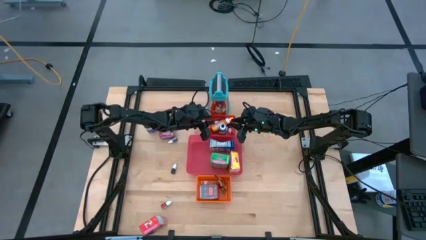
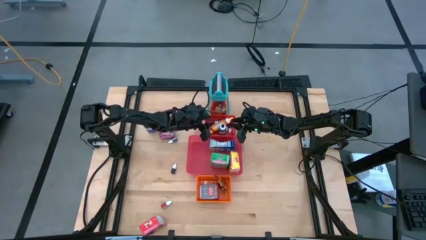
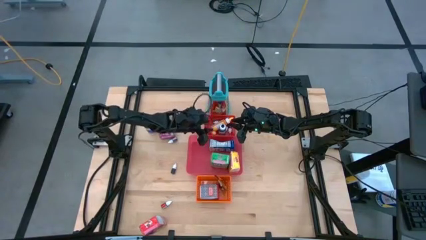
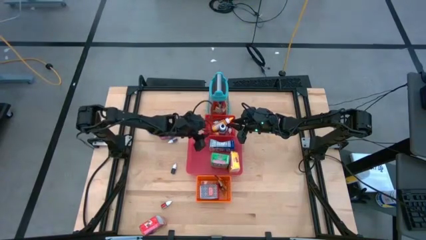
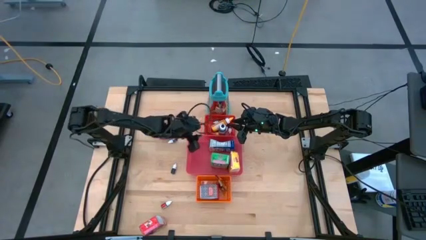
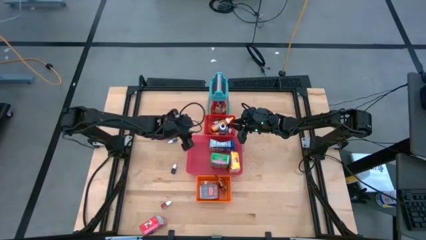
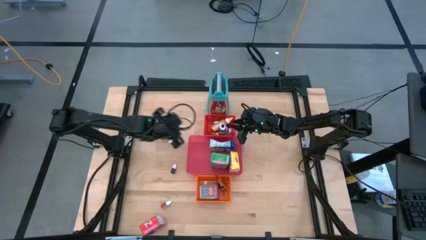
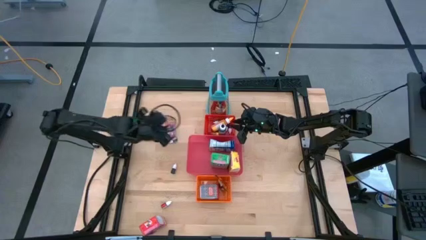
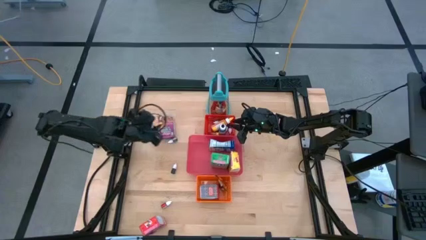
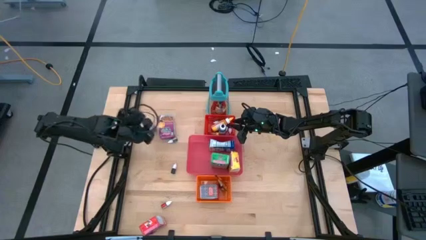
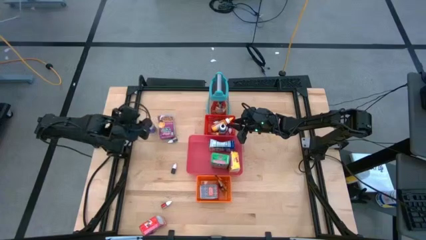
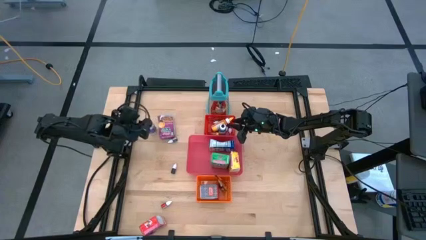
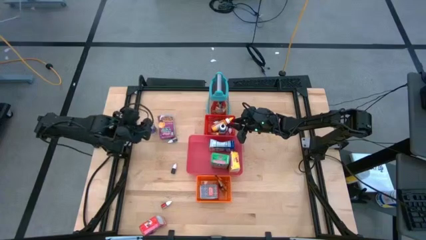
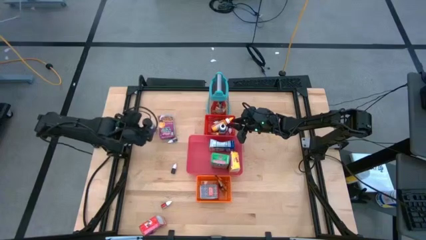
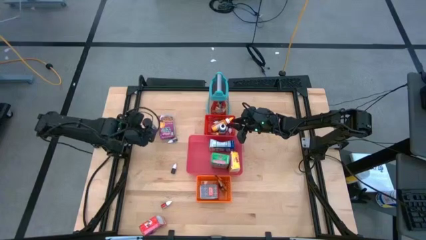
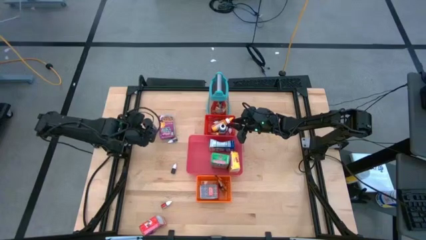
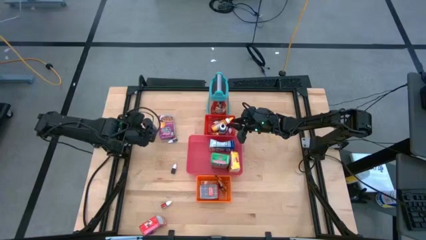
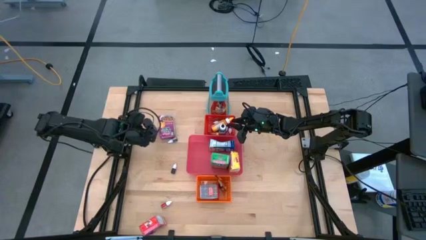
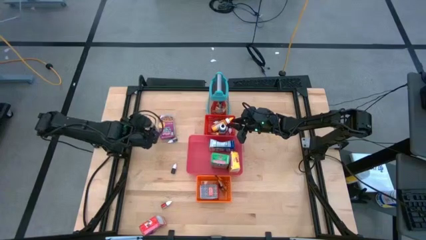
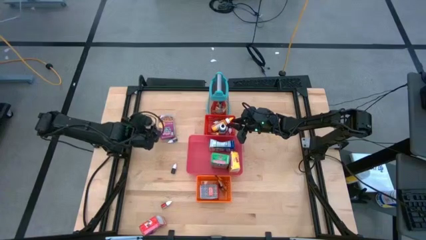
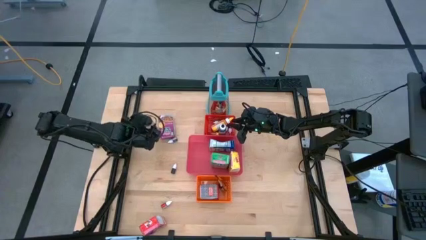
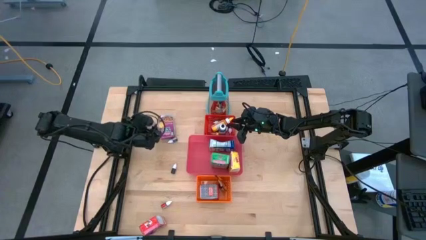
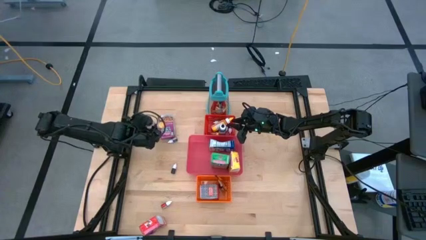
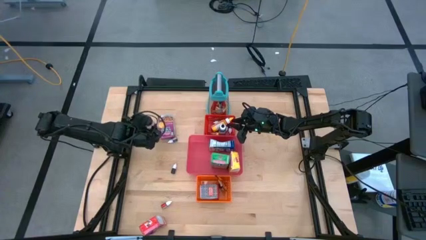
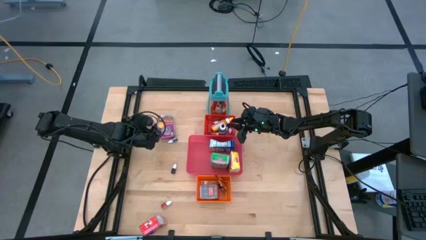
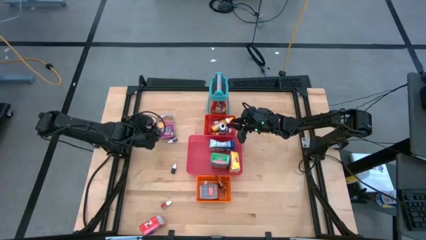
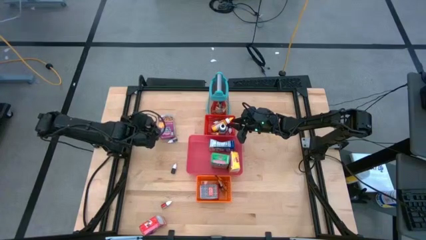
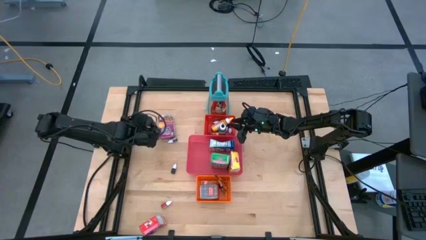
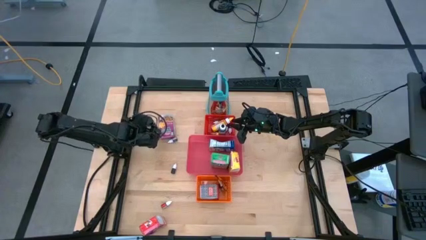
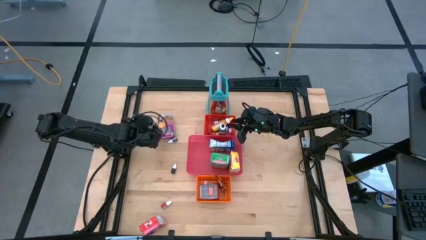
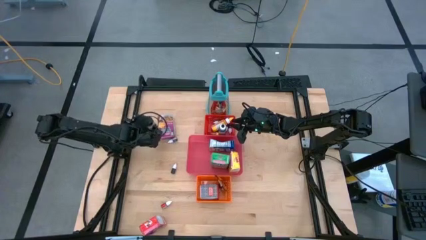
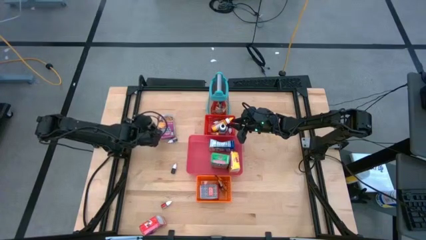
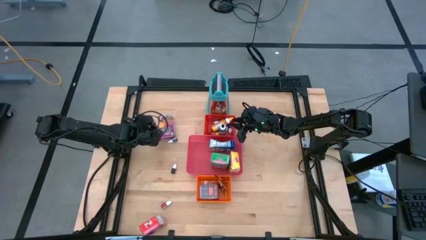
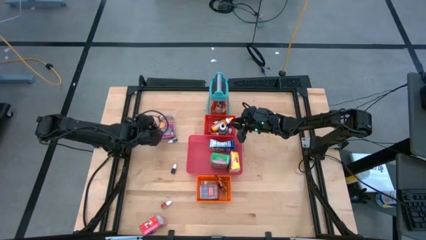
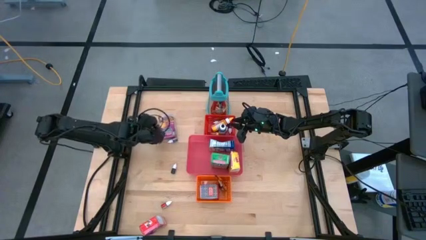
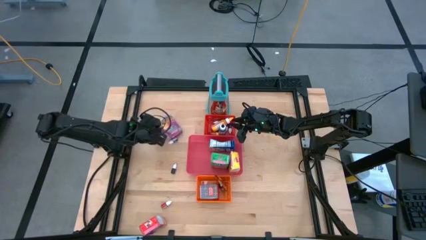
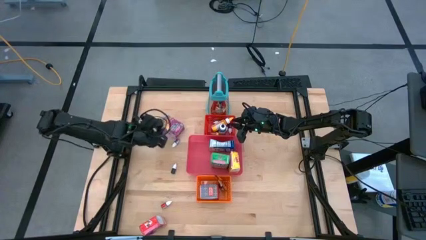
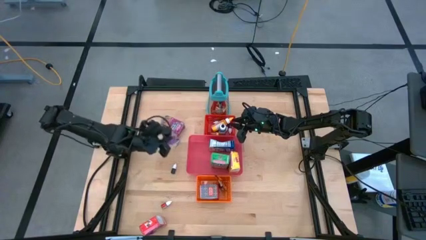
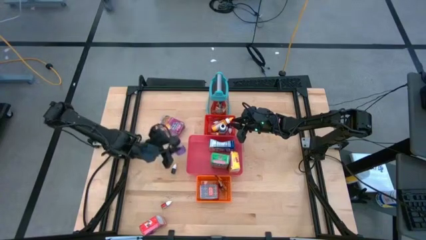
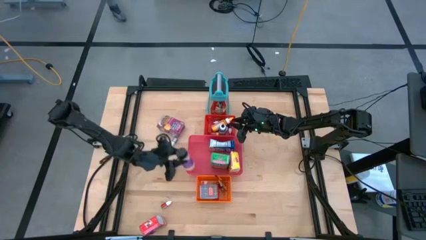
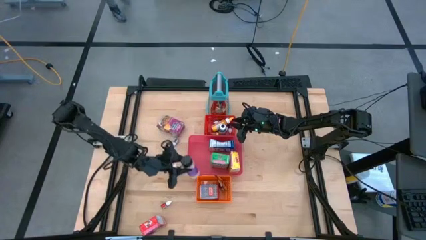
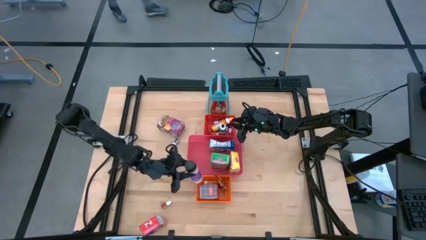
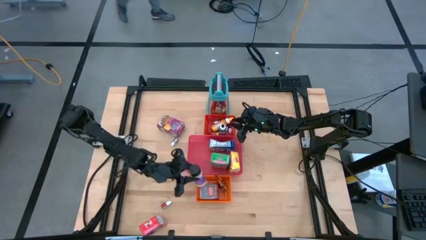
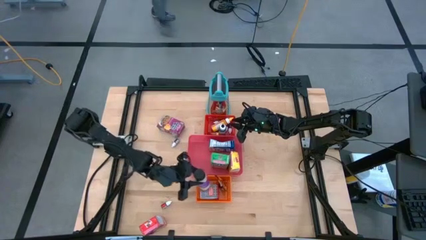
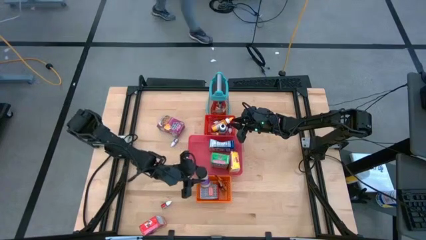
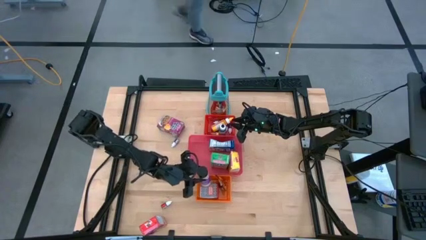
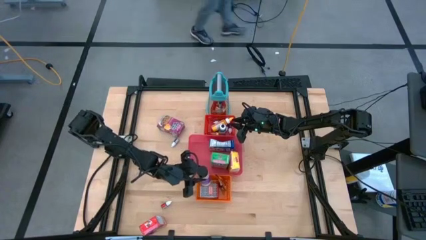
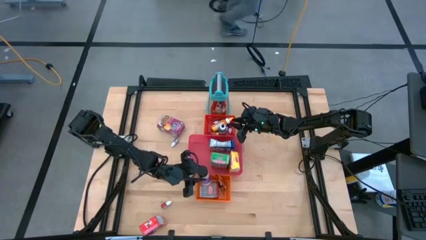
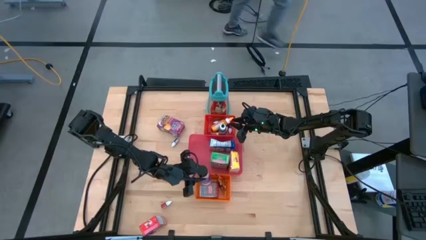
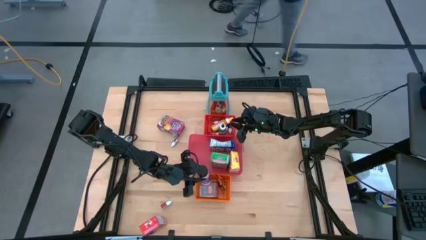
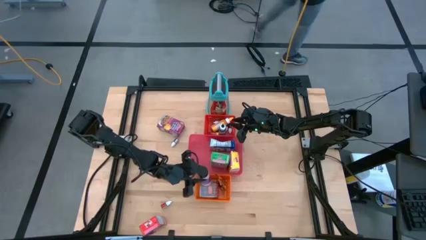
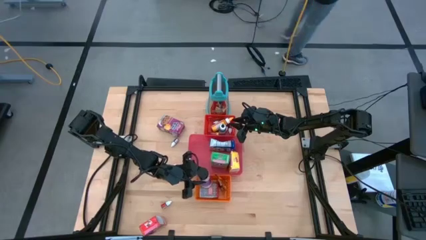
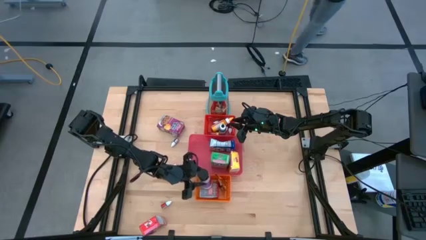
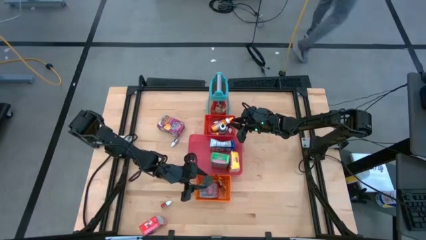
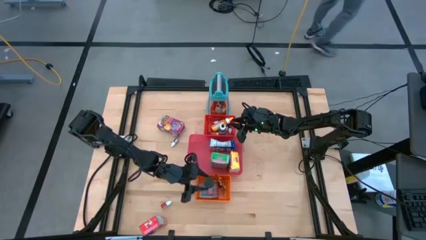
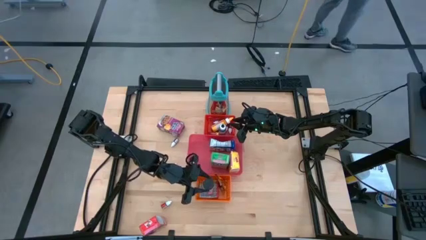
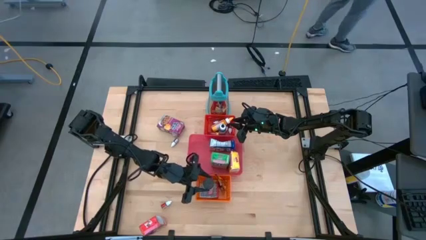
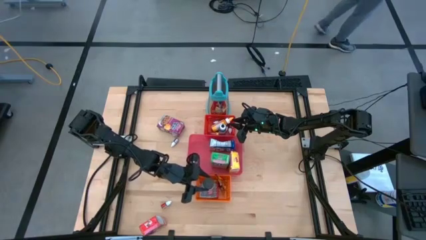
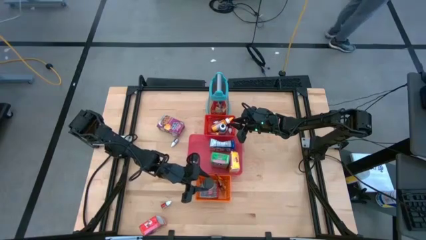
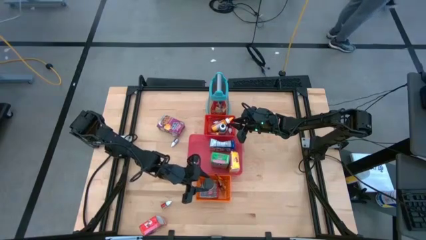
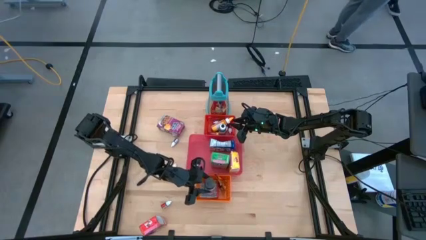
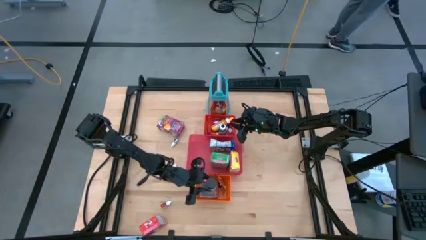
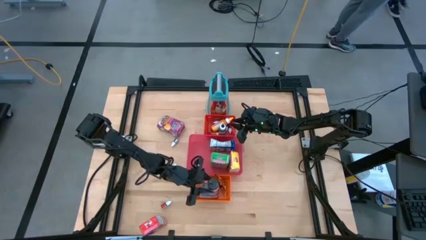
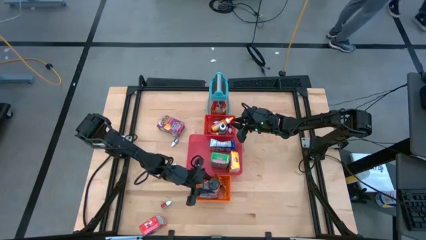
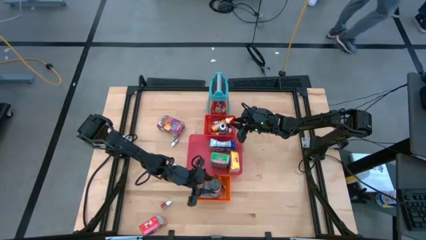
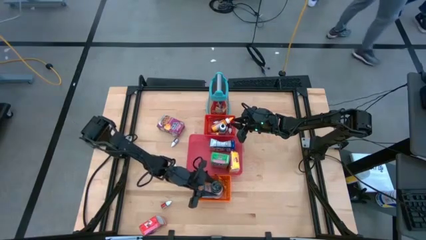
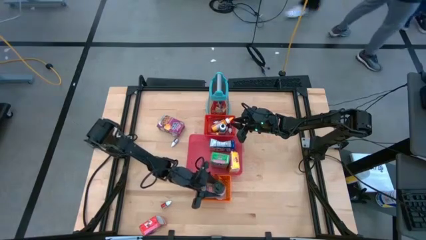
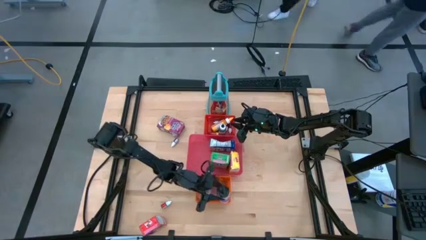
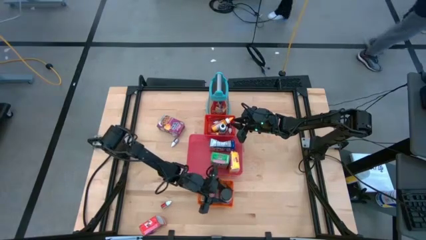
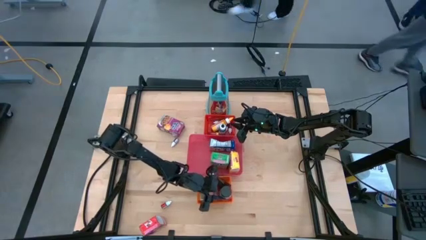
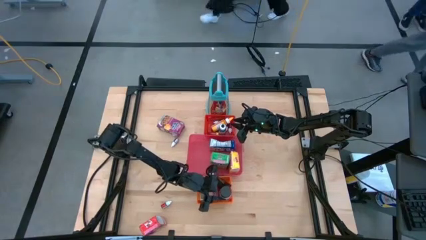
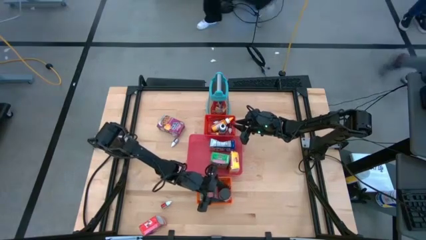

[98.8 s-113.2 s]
Task: Pick & Place Kitchen Items
Put the violet seasoning bottle into the orange bin

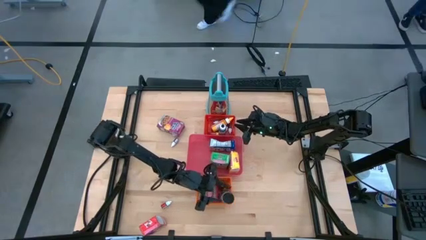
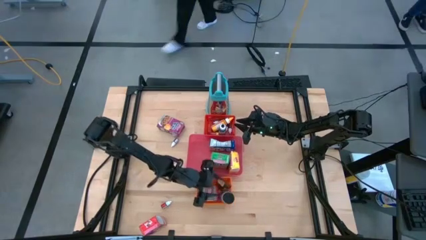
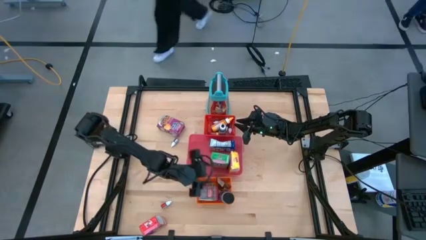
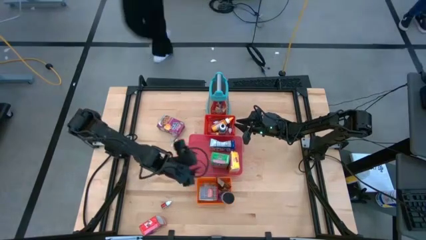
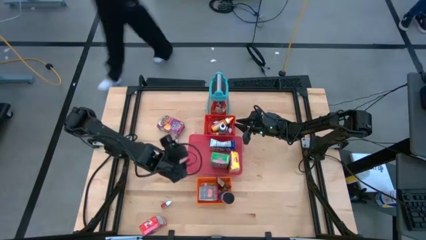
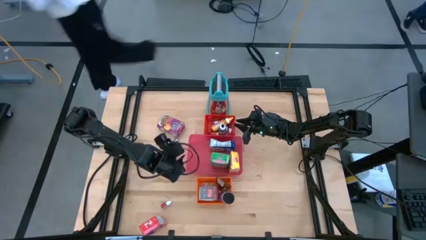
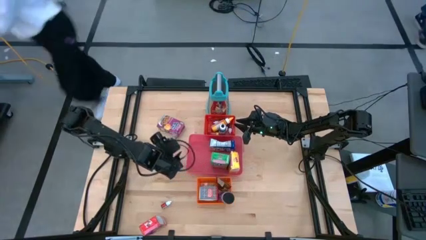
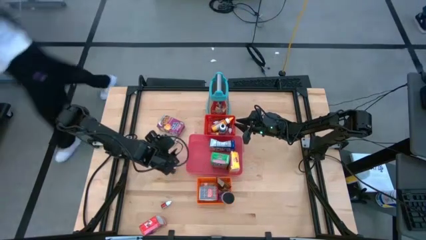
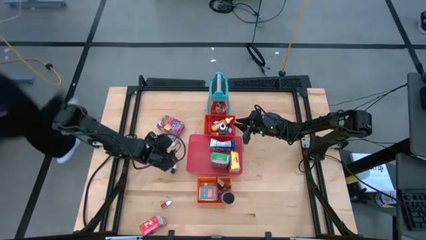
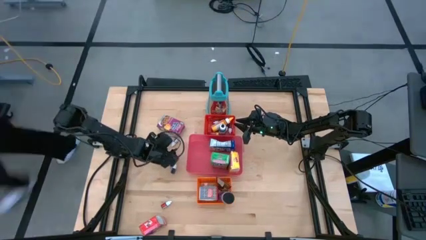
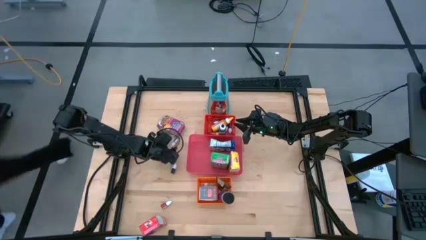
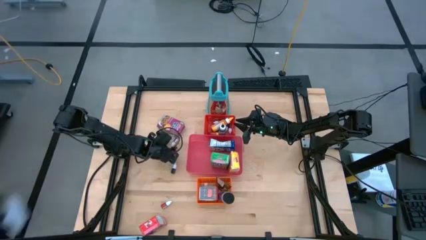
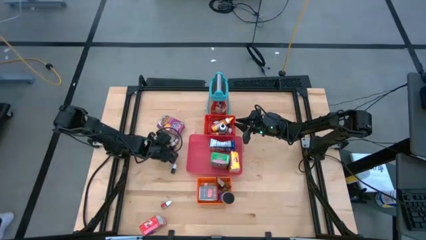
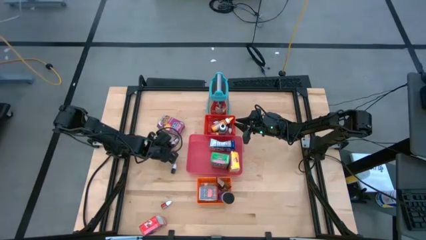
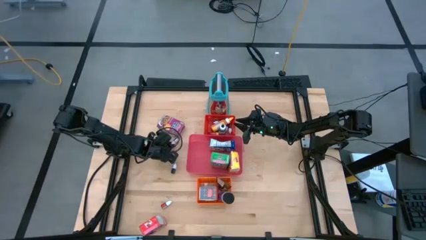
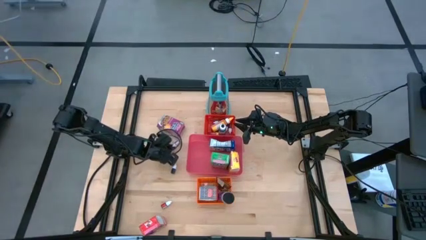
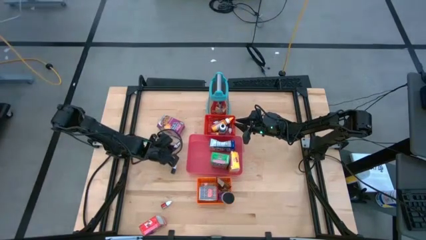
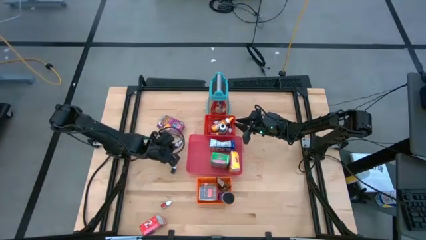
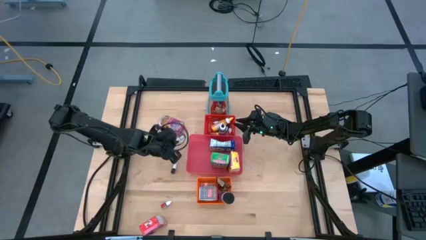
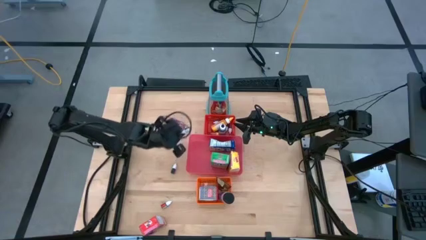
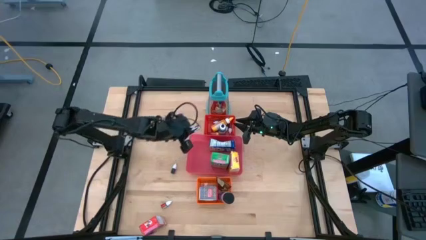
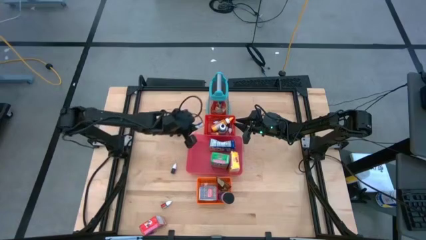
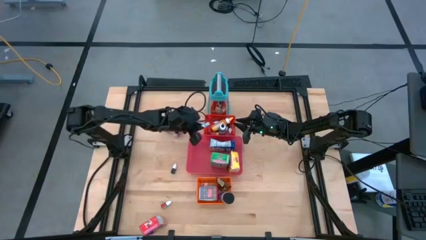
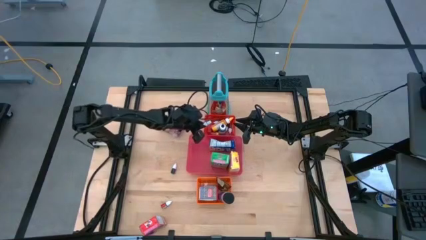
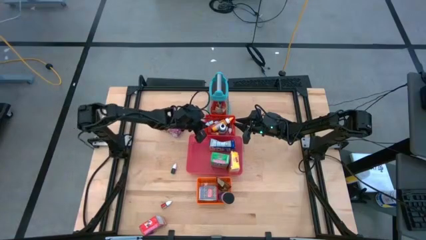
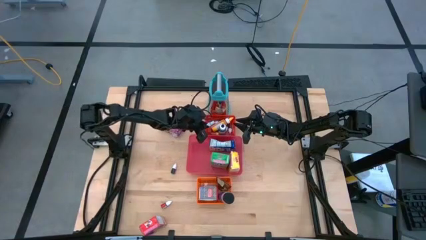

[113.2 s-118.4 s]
Put the small black food coloring bottle into the red bin
